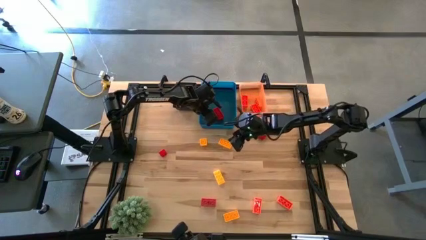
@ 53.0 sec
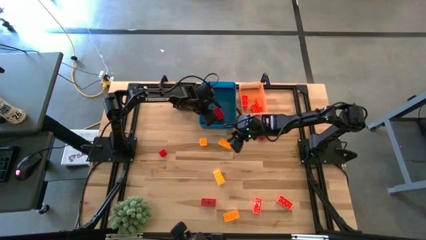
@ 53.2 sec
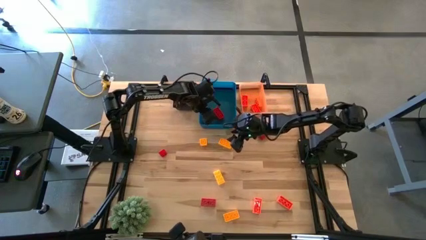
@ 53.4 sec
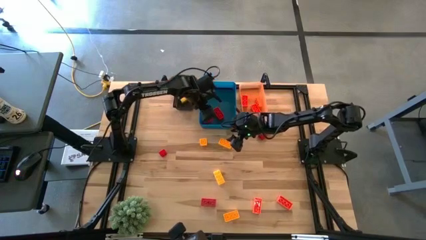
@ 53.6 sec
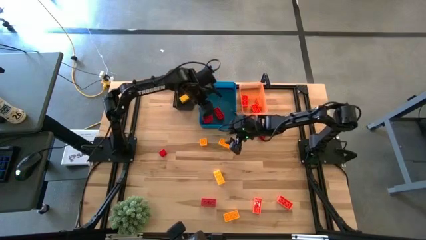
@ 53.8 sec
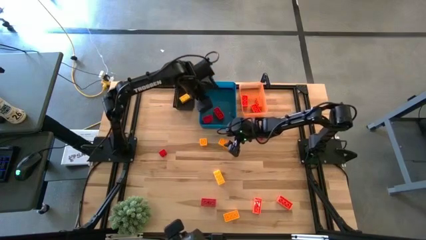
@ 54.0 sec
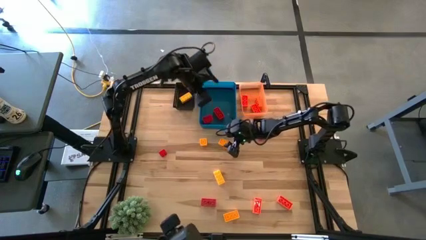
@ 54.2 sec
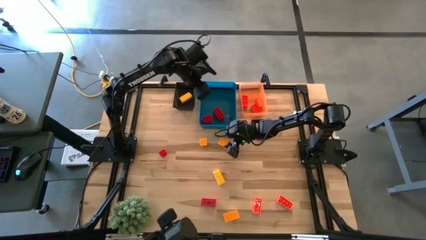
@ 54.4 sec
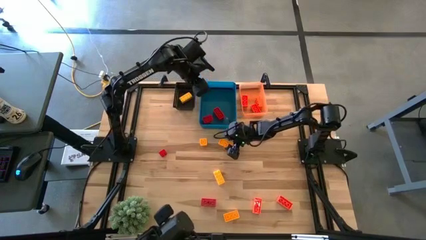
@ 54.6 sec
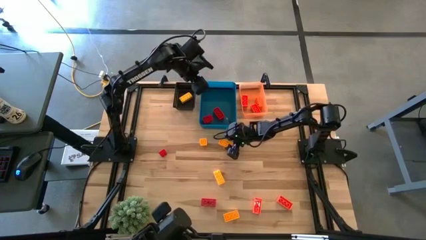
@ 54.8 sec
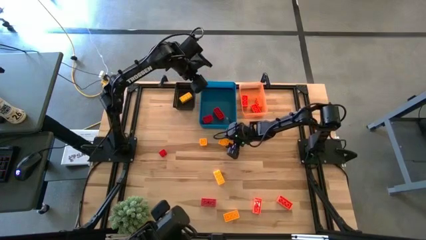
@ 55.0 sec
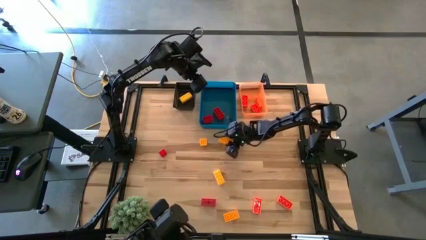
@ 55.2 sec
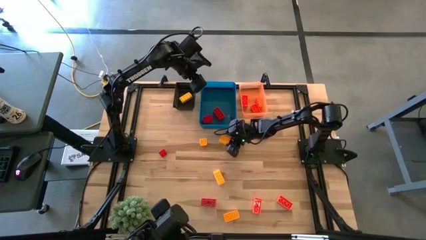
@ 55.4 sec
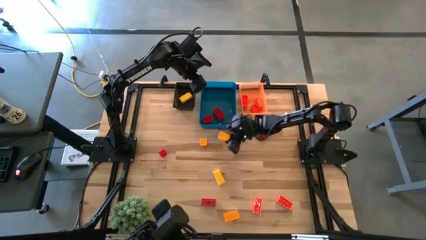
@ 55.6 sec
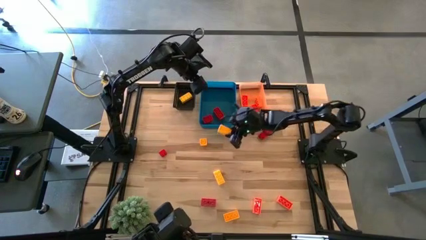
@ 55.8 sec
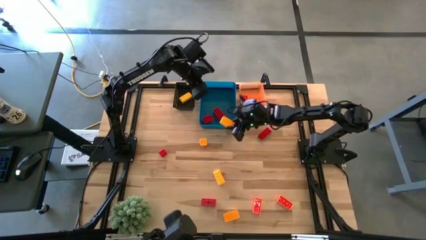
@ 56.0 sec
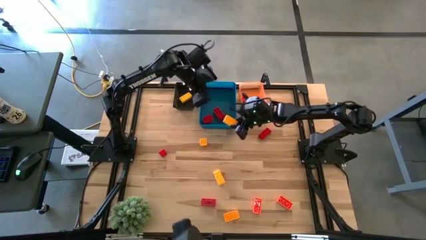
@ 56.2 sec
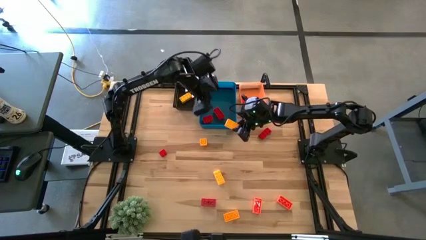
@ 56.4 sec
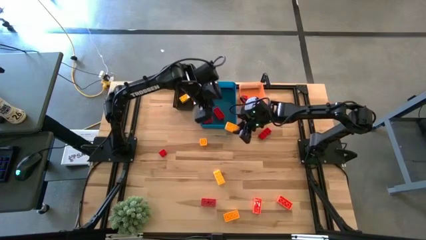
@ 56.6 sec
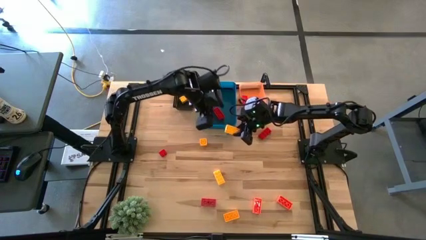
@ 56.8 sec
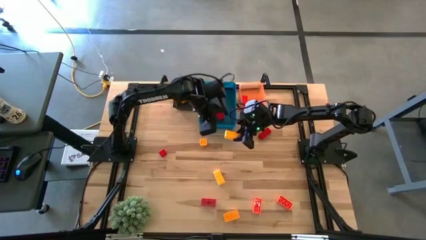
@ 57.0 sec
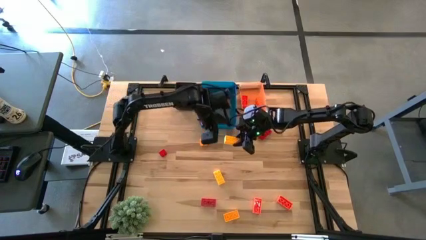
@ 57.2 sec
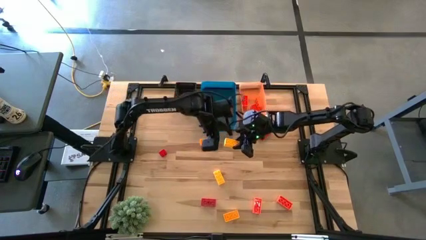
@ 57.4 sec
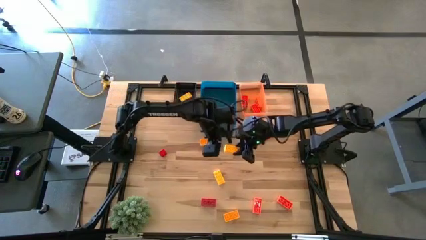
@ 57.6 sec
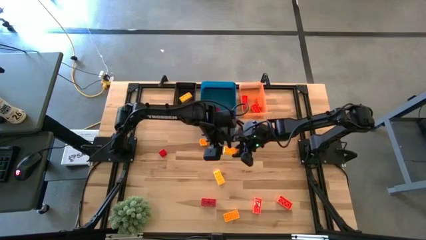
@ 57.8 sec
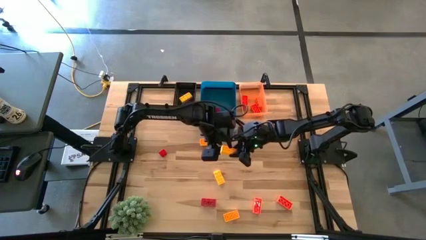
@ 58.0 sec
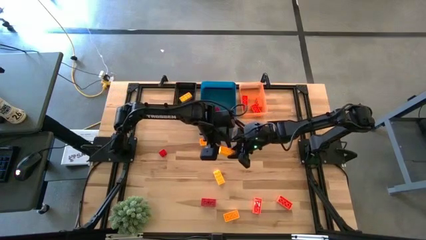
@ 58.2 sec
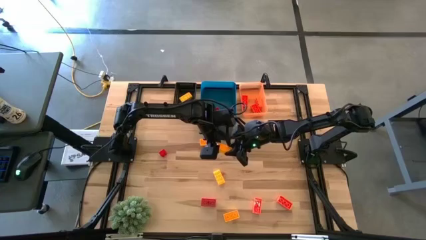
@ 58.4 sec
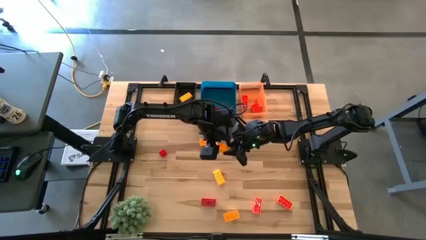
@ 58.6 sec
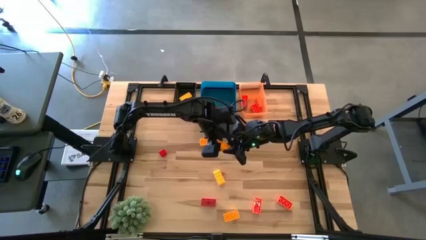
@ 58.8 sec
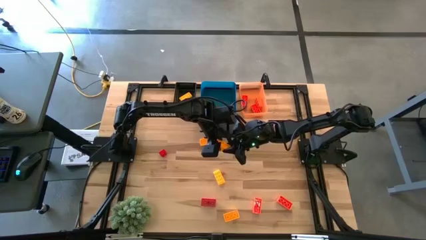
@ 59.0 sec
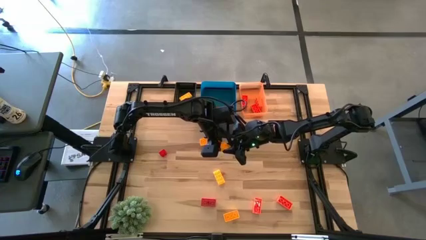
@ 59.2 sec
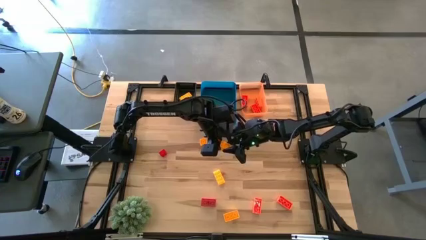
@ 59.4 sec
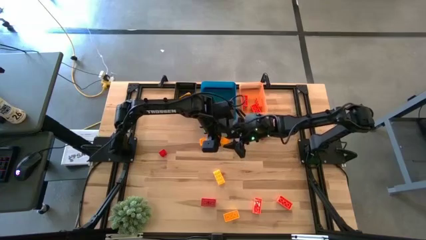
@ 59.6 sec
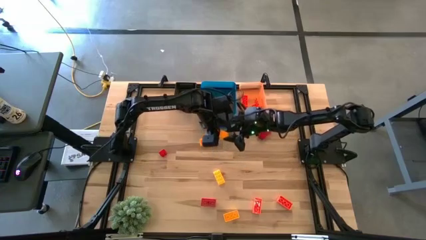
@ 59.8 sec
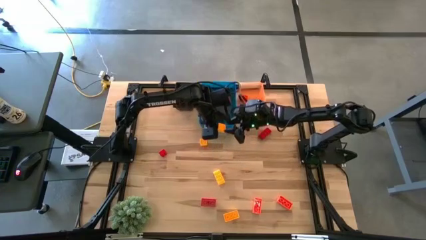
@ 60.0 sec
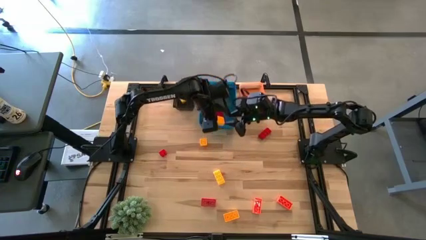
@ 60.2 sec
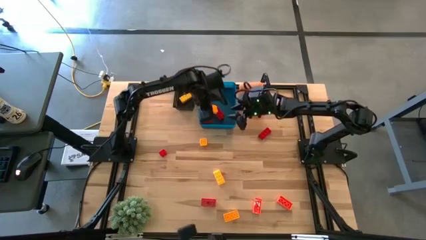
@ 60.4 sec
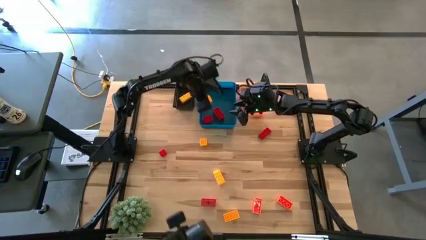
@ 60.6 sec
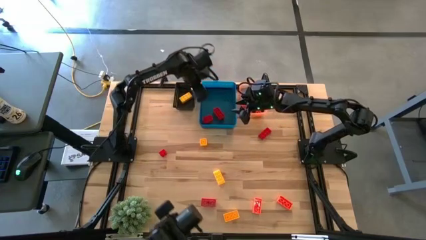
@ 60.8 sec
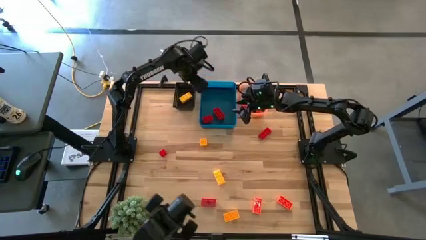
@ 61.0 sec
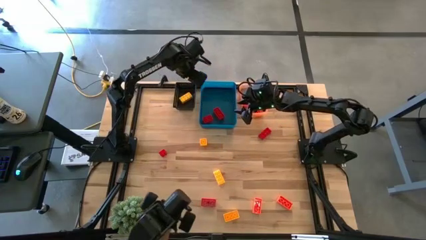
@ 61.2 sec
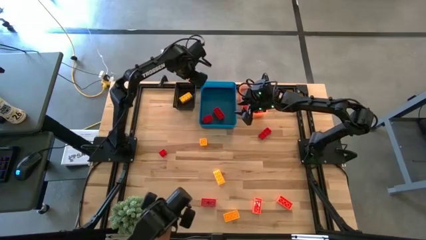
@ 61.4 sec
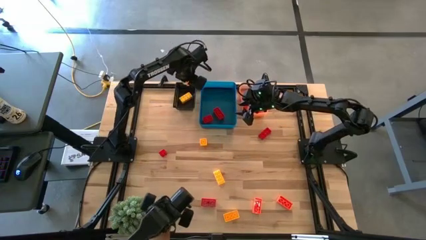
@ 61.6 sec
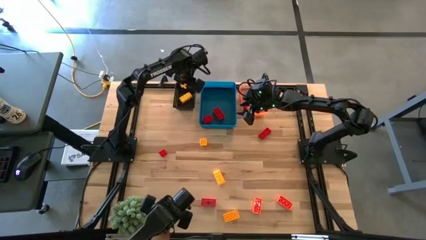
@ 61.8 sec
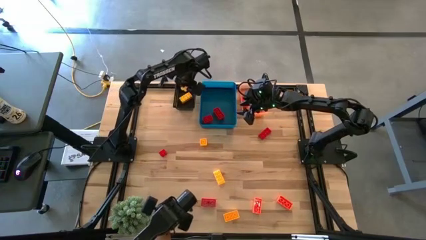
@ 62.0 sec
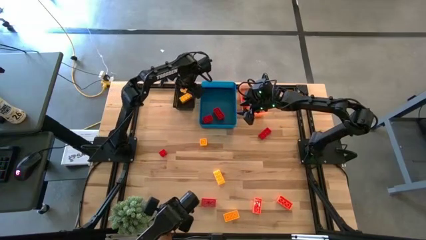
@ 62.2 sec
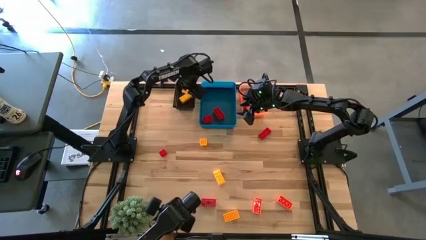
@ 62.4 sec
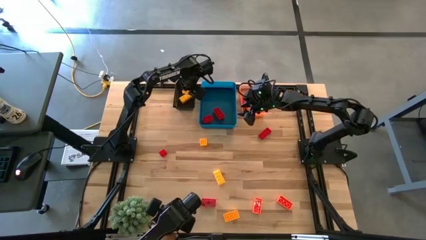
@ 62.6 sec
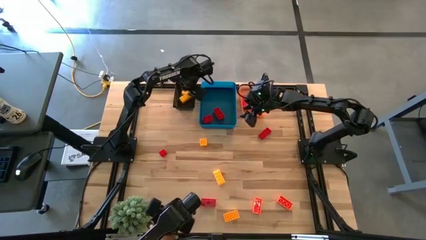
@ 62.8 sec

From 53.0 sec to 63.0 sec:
Task: Sort & place blocks by color
Put the yellow game piece into the black bin

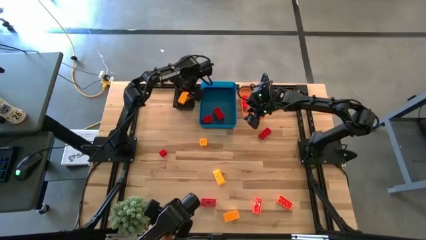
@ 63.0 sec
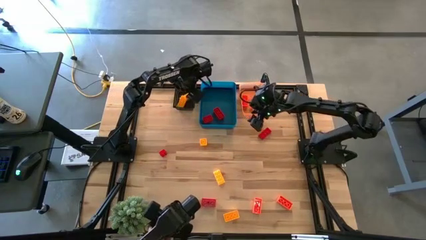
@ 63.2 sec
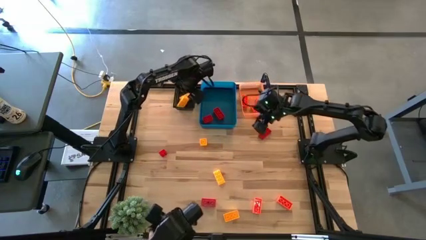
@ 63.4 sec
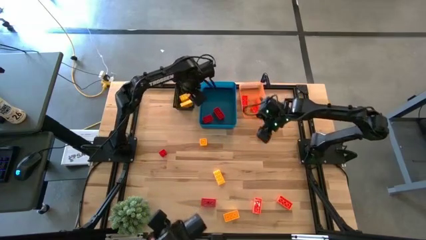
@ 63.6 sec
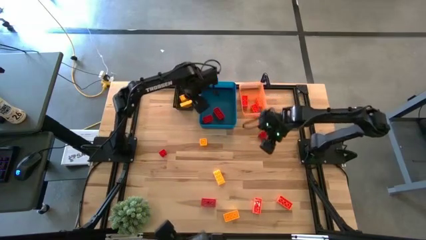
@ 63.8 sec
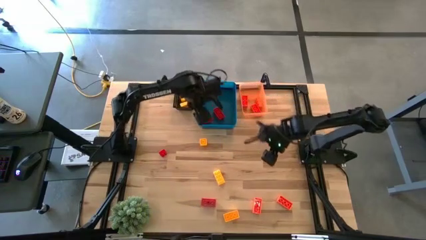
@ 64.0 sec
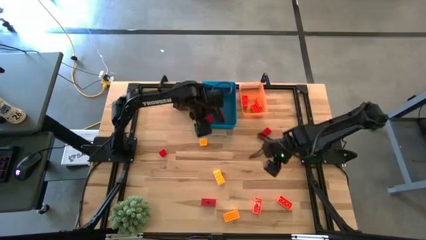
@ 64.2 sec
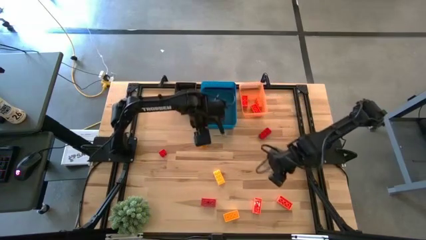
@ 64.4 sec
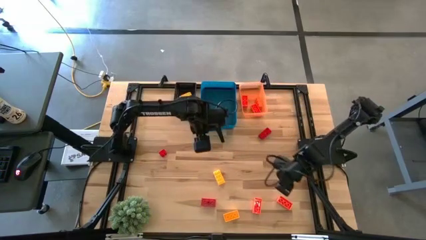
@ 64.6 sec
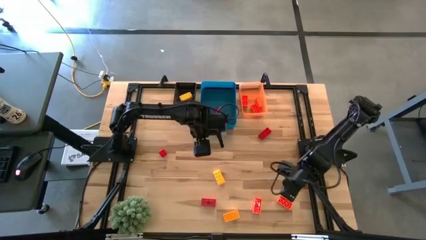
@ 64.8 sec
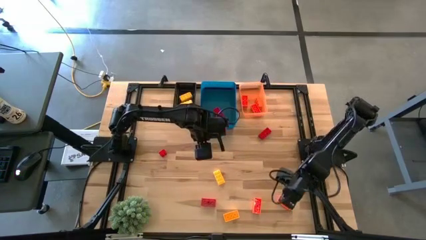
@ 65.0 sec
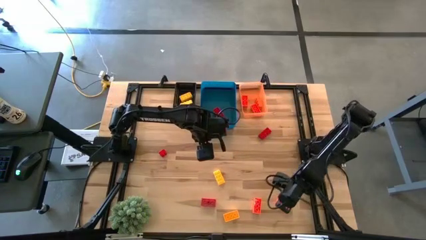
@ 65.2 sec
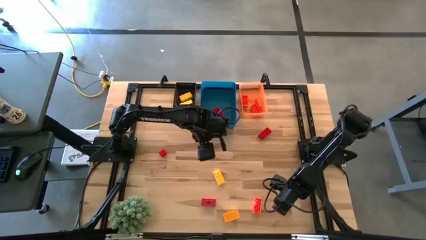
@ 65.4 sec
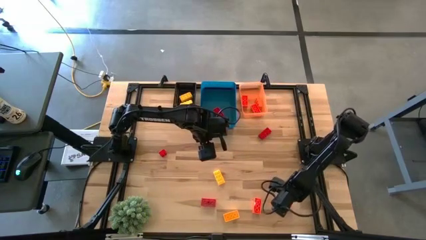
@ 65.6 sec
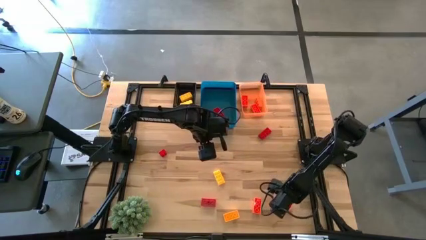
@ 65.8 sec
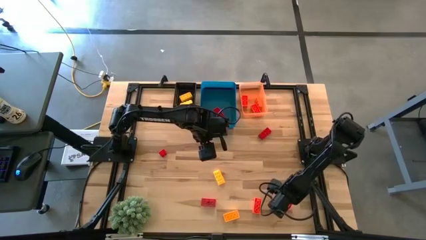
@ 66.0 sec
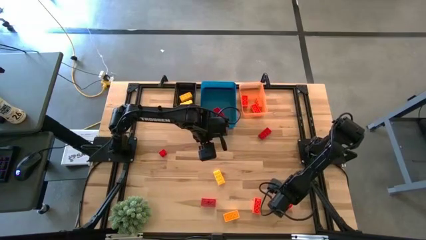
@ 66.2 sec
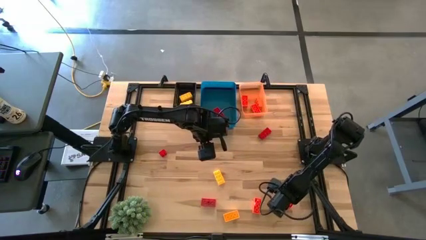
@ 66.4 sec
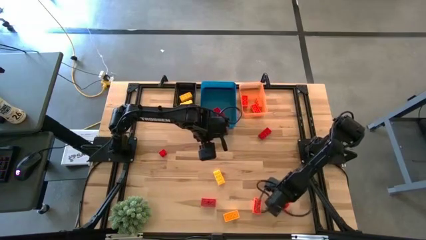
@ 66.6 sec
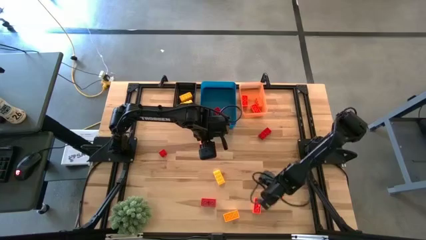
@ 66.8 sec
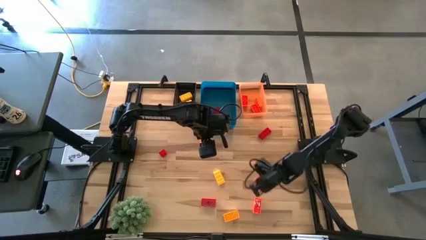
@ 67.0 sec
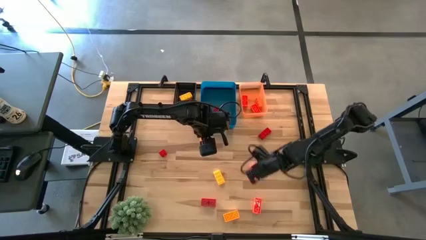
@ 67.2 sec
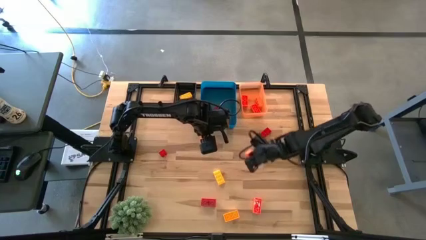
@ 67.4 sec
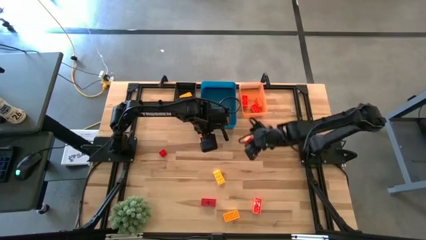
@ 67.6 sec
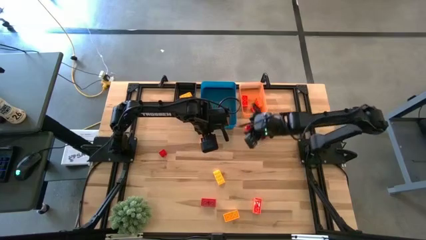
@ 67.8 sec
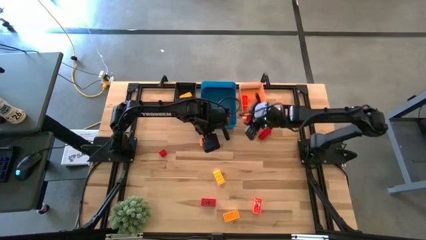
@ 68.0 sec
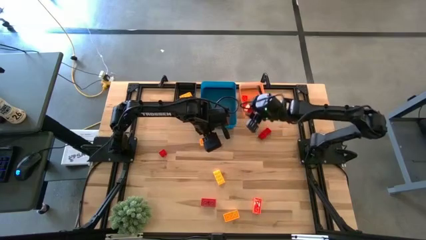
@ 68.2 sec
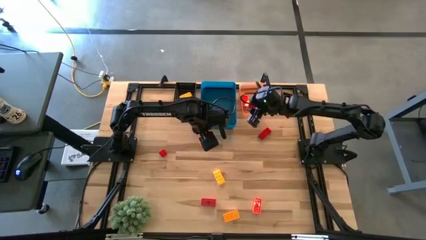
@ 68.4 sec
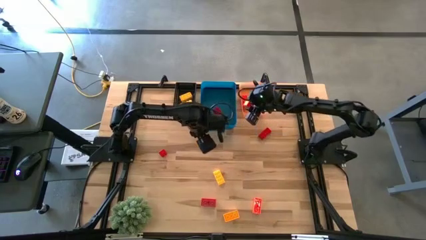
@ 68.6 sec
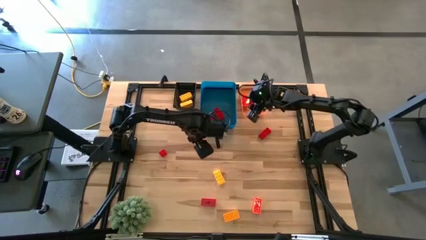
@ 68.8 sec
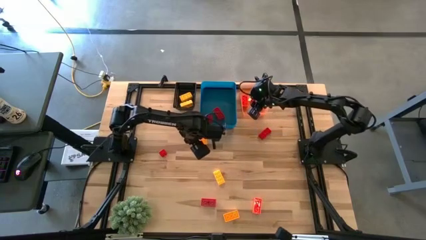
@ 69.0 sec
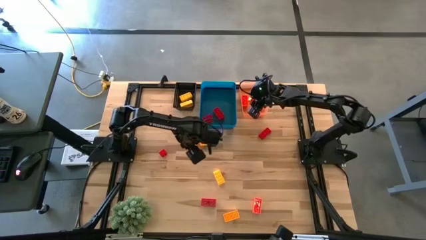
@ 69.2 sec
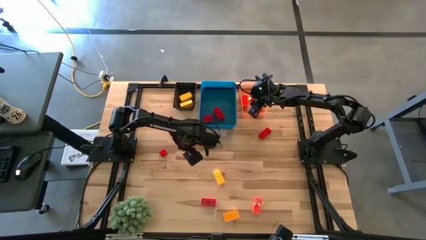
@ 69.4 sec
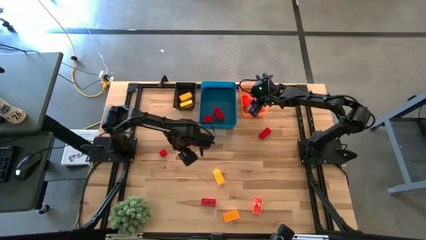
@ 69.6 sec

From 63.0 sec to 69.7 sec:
Put the orange game piece into the orange bin

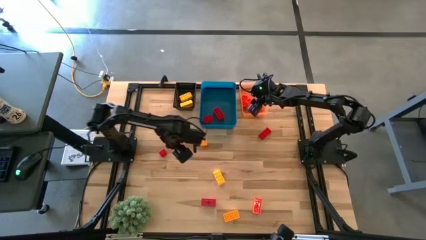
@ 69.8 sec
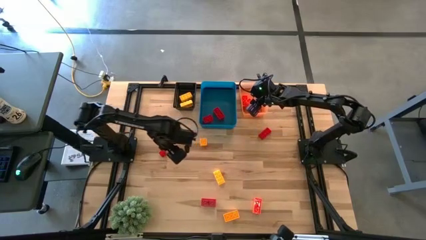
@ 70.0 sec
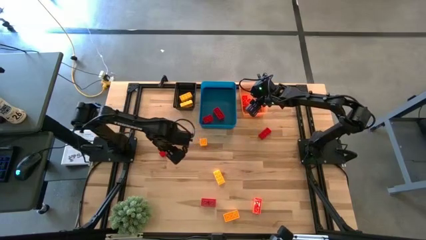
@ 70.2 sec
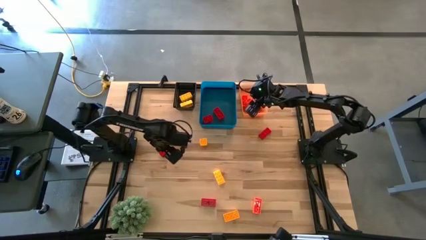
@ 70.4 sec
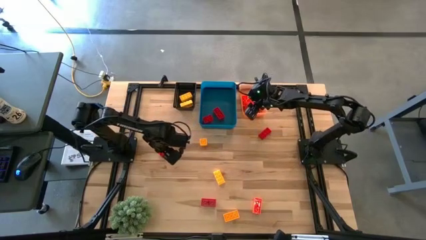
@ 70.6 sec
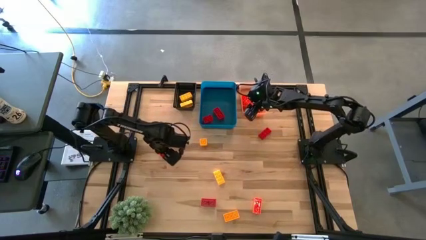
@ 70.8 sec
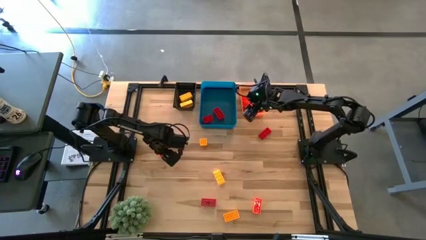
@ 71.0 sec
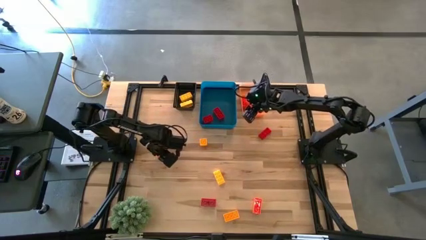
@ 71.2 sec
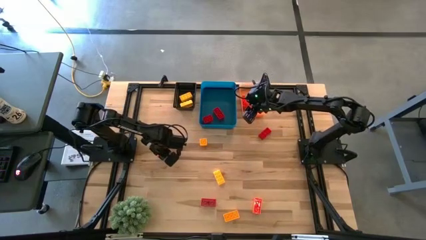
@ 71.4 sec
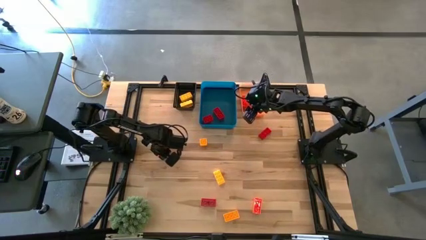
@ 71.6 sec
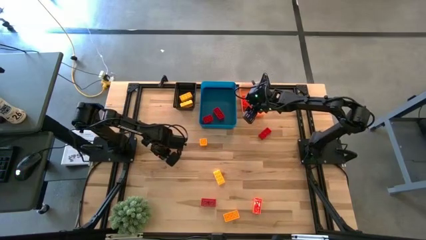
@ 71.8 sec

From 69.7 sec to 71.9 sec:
Put the red game piece into the blue bin
